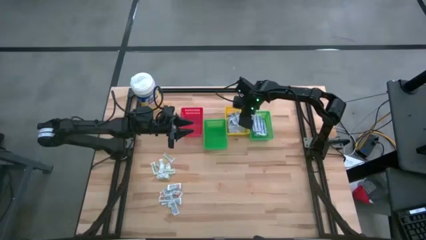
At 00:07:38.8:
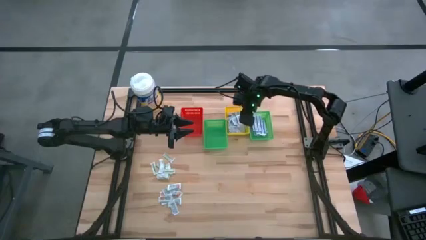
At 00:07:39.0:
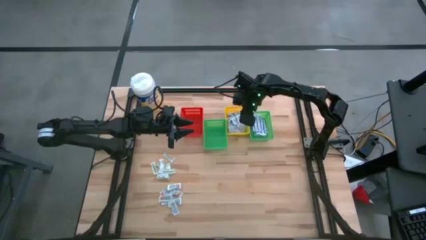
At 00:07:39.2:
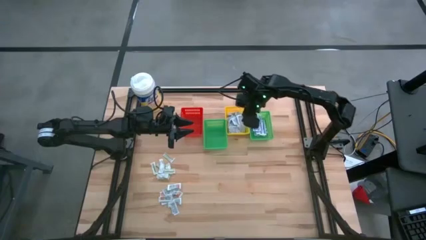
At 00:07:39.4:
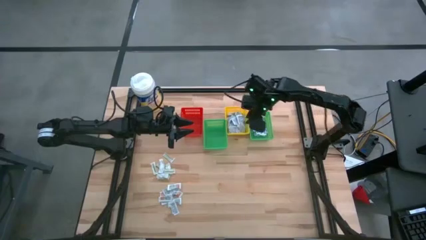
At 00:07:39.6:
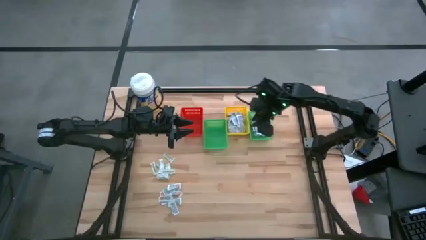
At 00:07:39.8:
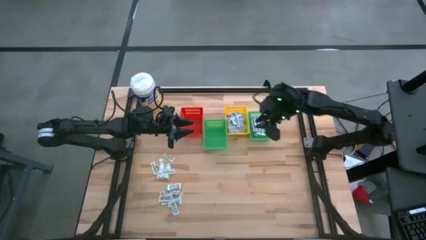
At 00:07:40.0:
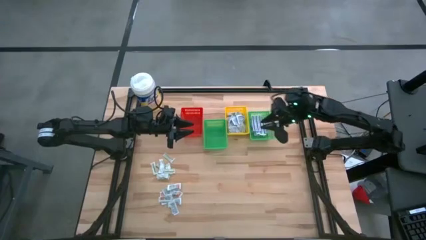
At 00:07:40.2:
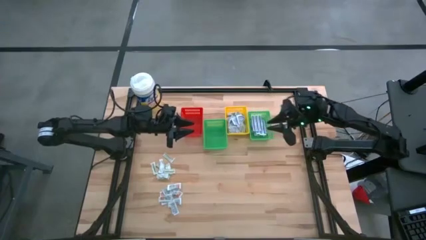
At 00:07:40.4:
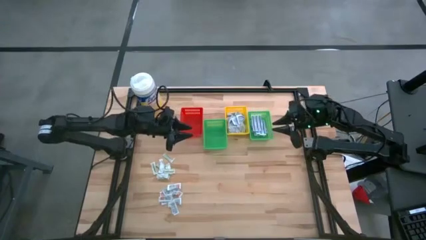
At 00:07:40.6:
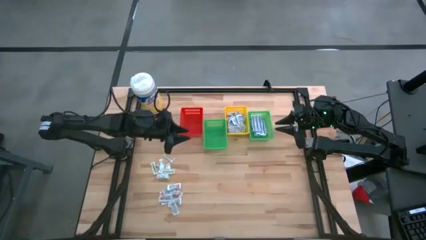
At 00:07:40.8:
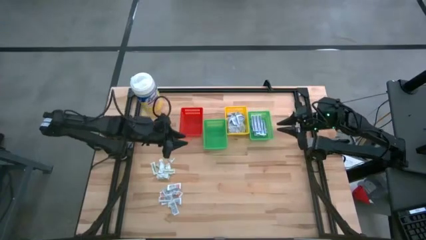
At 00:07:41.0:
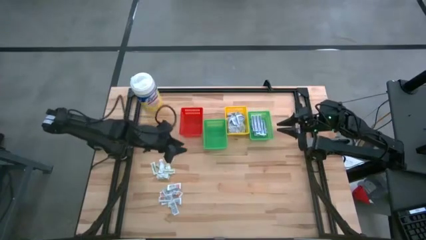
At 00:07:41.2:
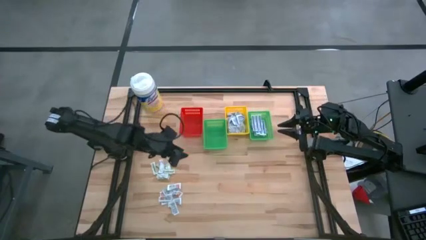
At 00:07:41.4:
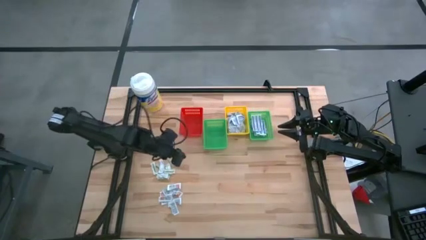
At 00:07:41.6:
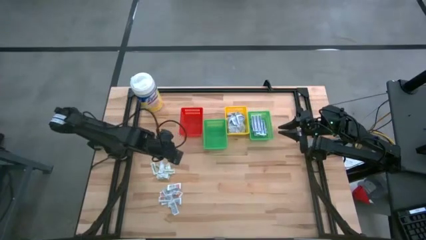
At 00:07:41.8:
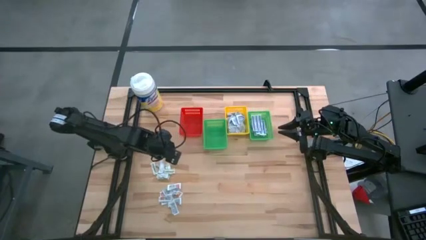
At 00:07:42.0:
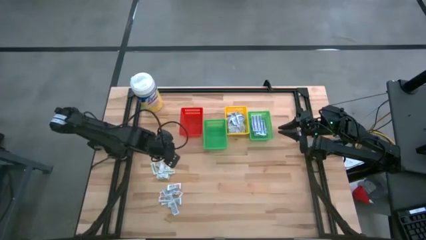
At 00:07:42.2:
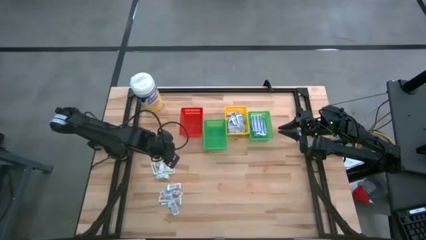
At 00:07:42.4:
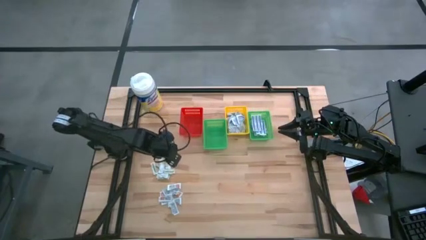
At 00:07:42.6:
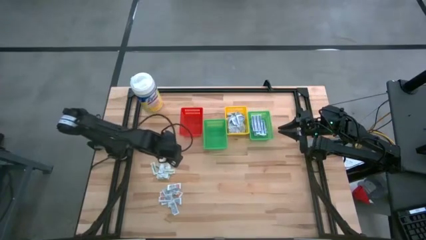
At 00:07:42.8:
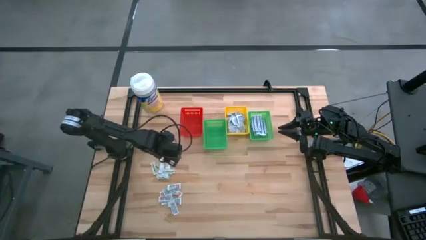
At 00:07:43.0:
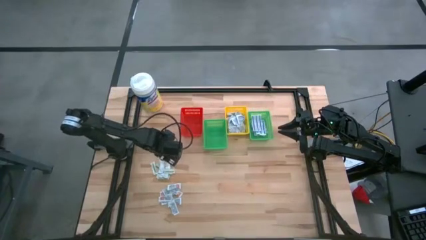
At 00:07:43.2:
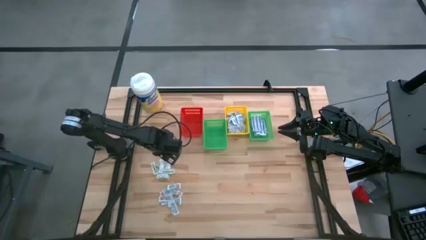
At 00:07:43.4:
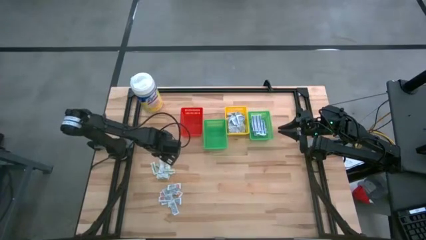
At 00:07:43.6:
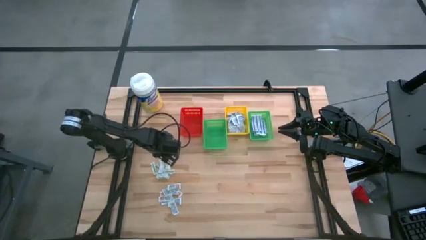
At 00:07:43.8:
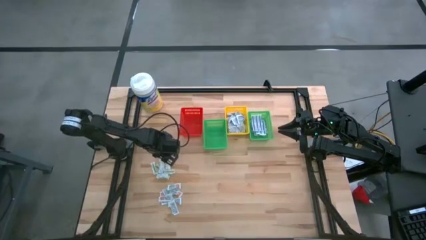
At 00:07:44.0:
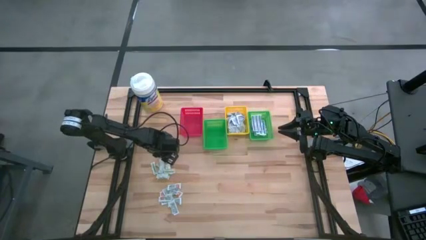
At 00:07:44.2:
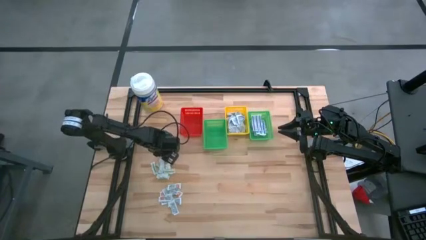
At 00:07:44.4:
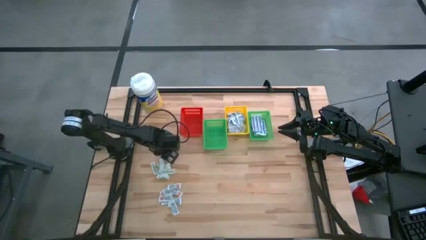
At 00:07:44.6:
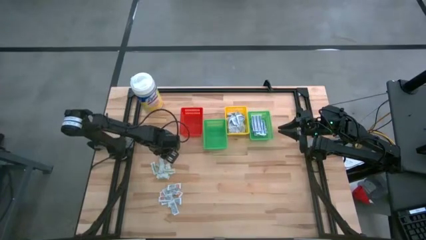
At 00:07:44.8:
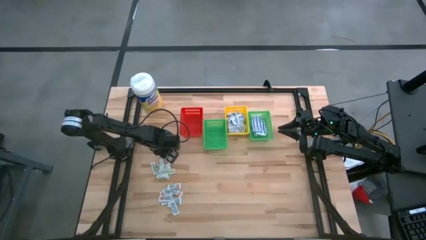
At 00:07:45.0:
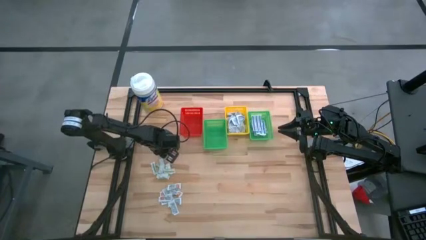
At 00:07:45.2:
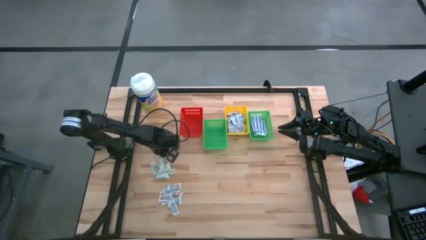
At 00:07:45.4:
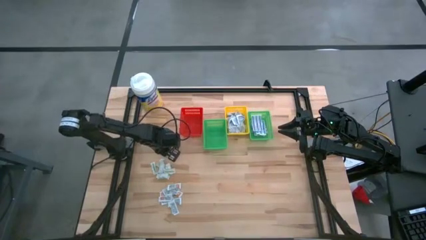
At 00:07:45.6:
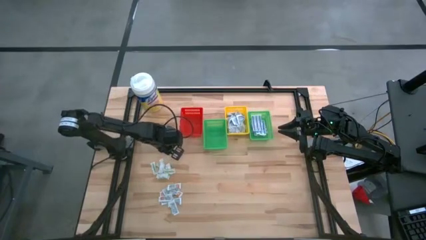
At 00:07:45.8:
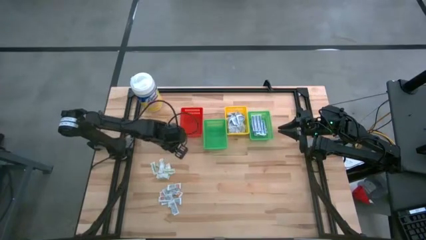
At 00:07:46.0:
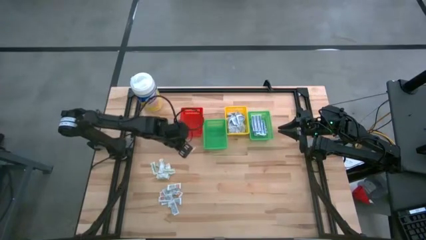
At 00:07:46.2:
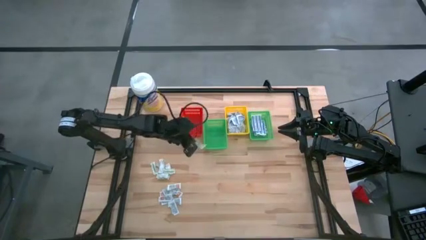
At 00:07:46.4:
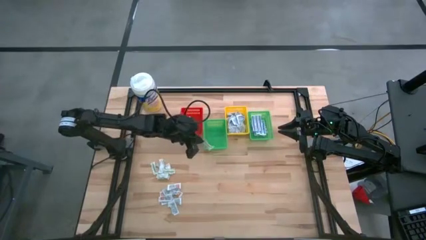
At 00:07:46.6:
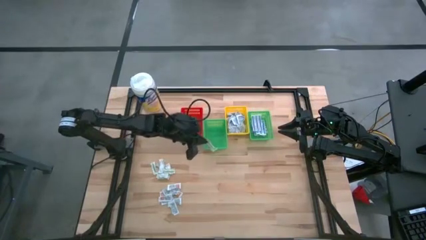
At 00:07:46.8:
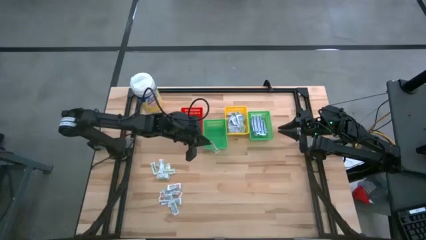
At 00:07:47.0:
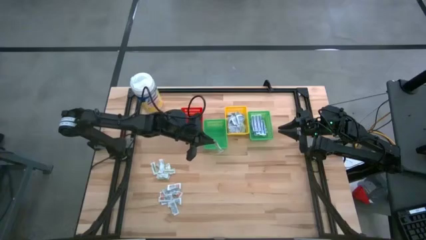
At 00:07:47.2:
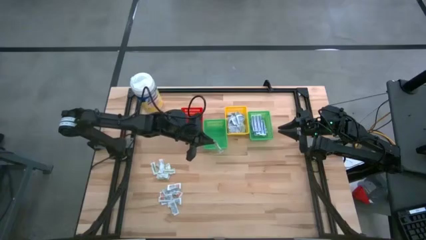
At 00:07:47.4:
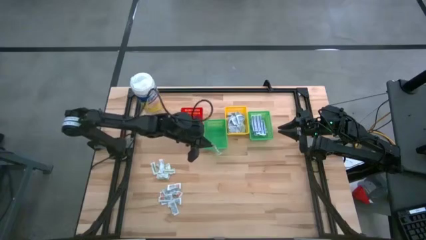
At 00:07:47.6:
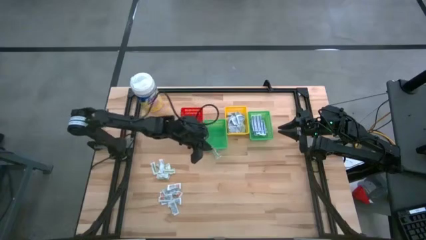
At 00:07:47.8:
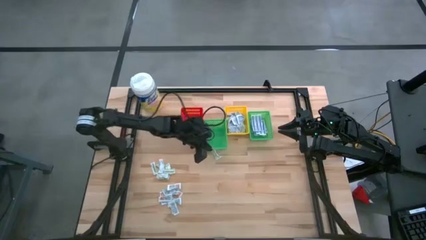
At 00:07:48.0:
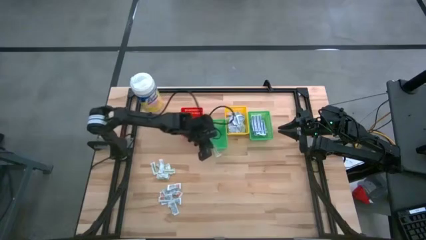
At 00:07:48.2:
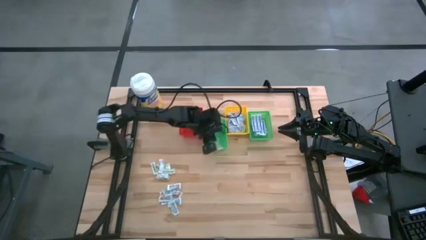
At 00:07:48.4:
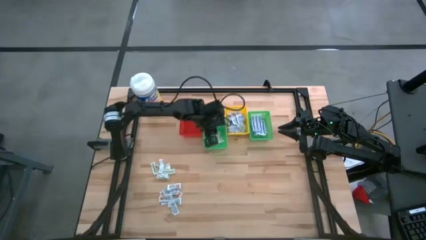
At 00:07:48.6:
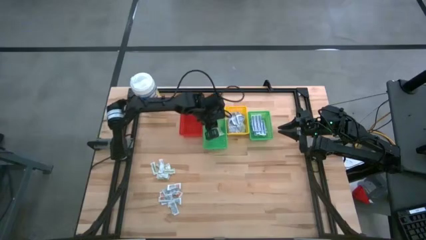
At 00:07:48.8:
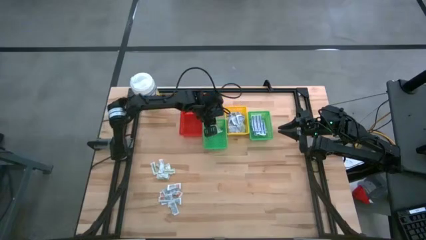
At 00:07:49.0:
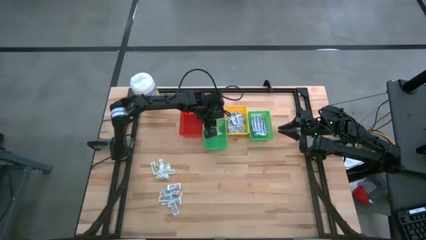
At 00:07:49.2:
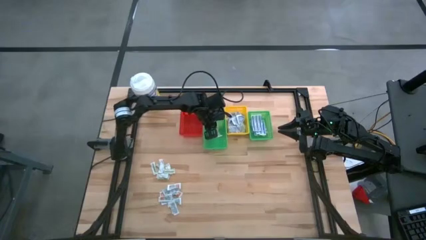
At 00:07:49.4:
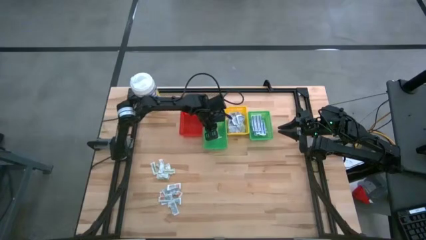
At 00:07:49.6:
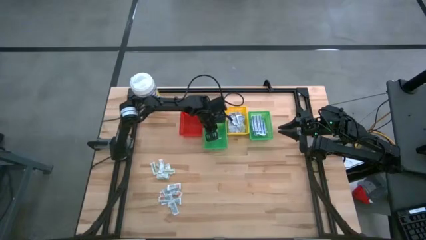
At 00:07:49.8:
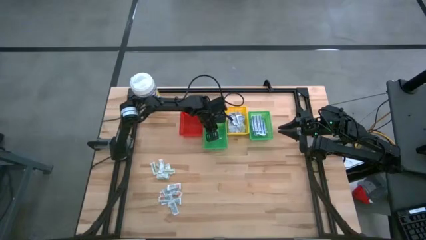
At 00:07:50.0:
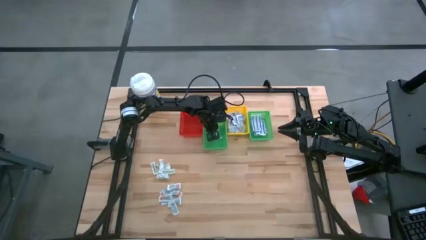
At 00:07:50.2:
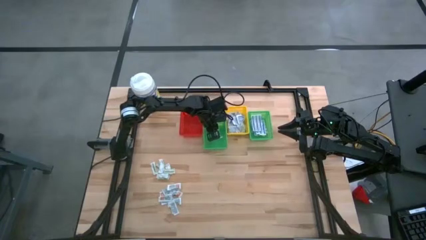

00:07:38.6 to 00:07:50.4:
Task: Pick & Place First Aid Supplies
Put the green bandage into the left green basket

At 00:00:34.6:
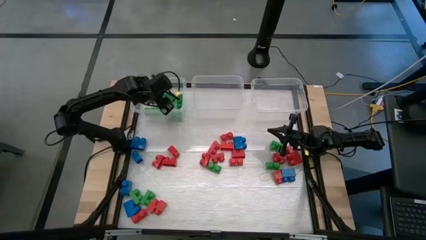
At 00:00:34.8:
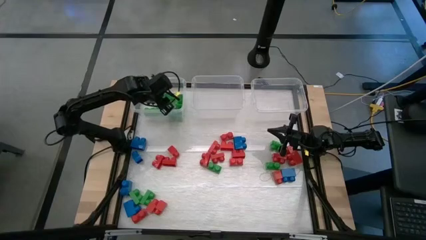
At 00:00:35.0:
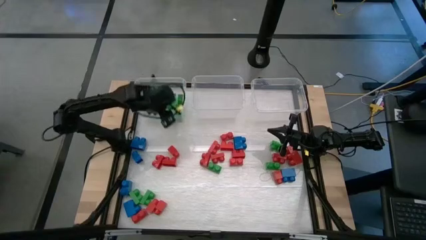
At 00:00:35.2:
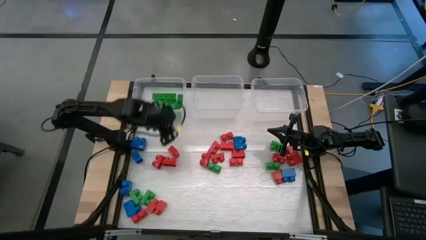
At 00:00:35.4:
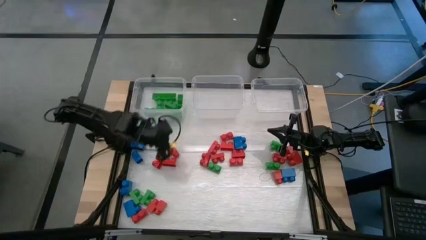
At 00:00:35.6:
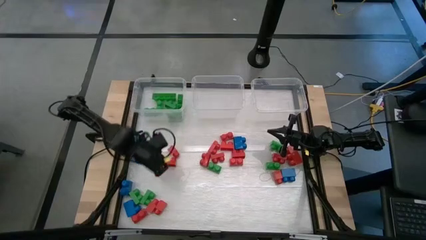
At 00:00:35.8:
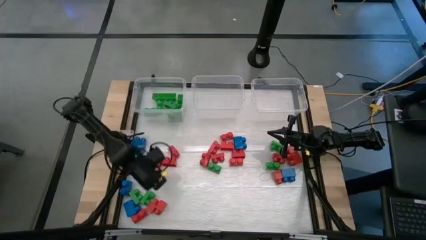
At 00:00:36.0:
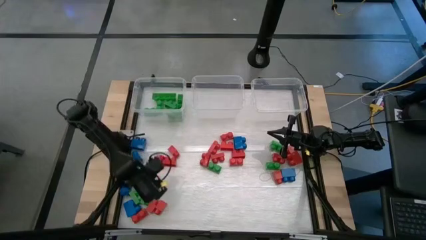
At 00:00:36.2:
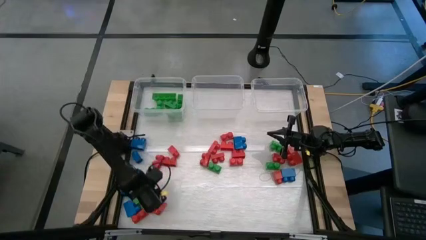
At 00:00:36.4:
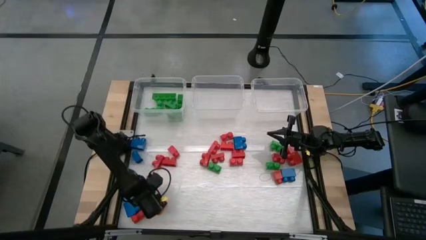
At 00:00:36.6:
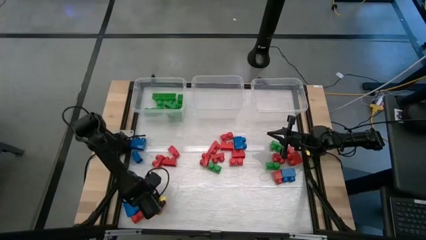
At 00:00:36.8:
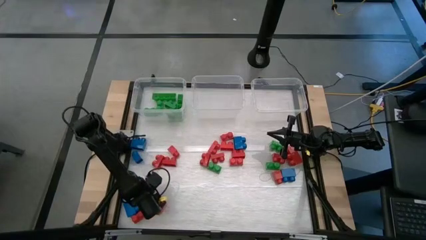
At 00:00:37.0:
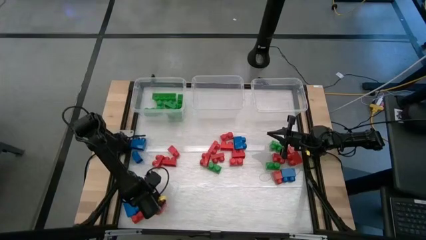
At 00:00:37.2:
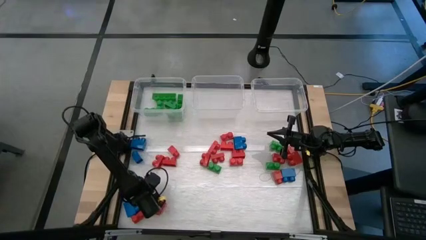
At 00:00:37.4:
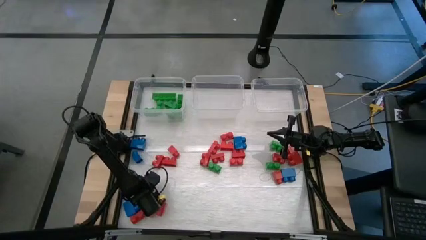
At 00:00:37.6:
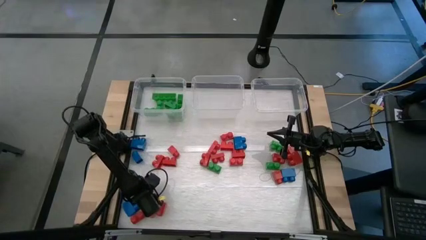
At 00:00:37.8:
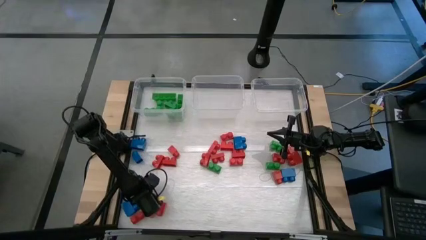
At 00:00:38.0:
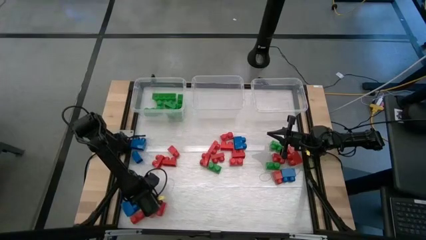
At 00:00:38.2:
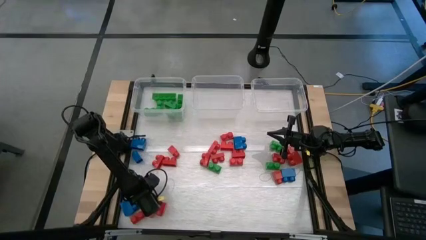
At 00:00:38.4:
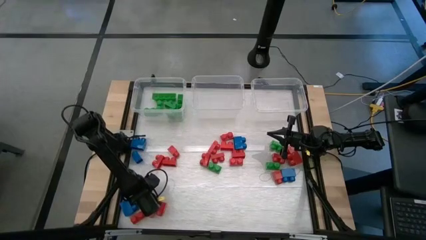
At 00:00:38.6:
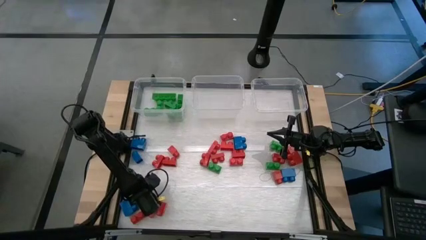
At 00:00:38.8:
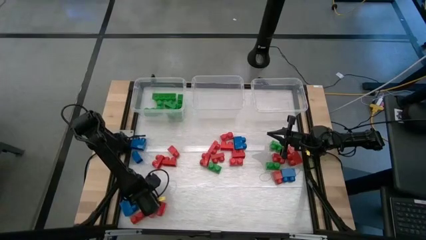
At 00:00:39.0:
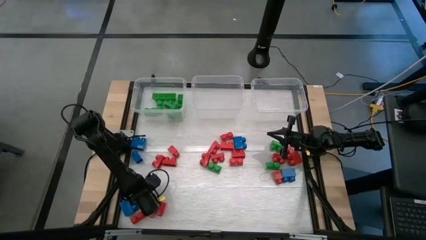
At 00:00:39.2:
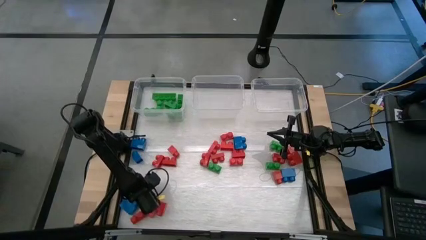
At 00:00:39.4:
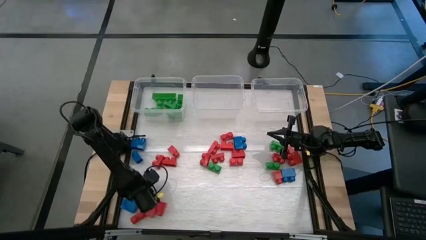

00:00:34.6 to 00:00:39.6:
Task: Sort blocks
Put the green game piece into the left transparent bin
